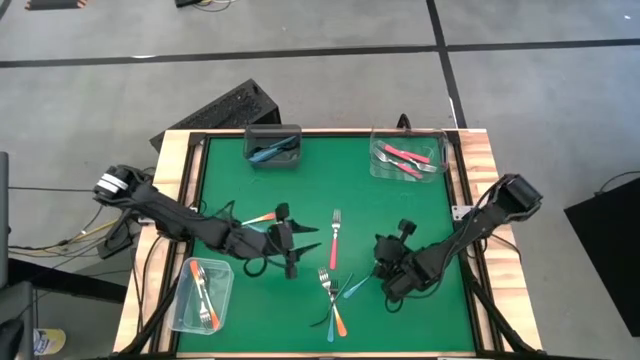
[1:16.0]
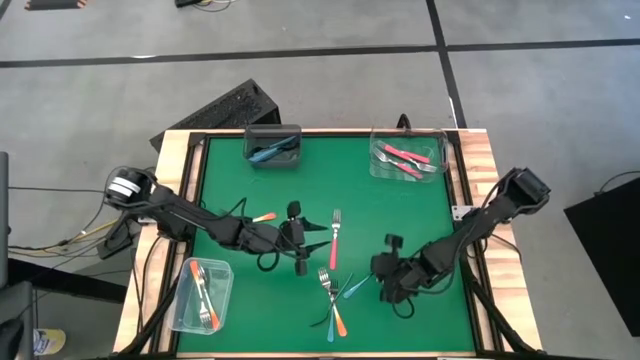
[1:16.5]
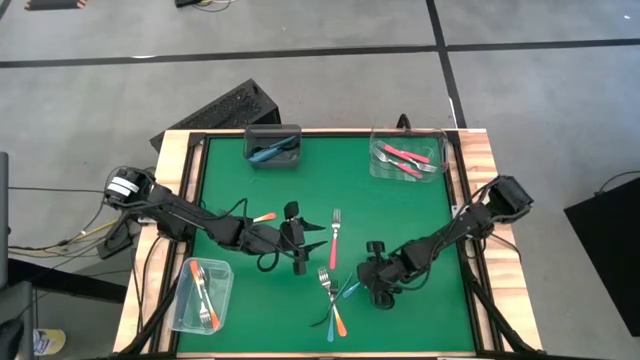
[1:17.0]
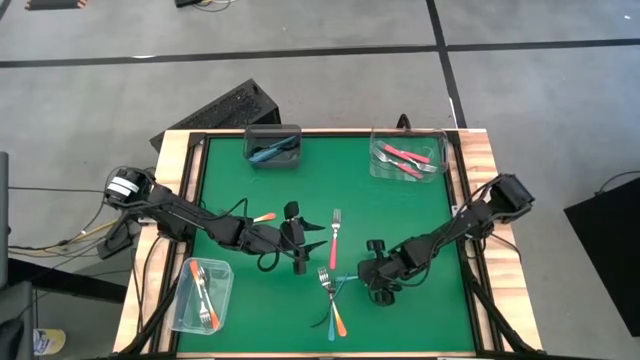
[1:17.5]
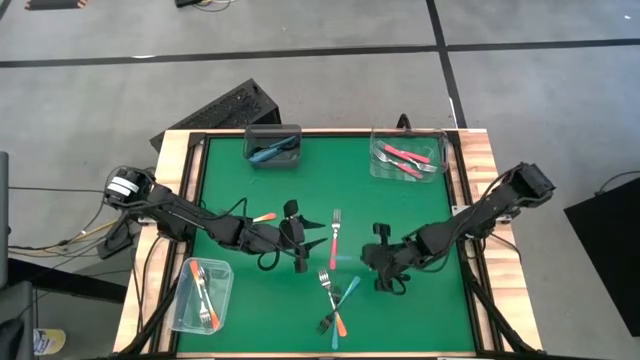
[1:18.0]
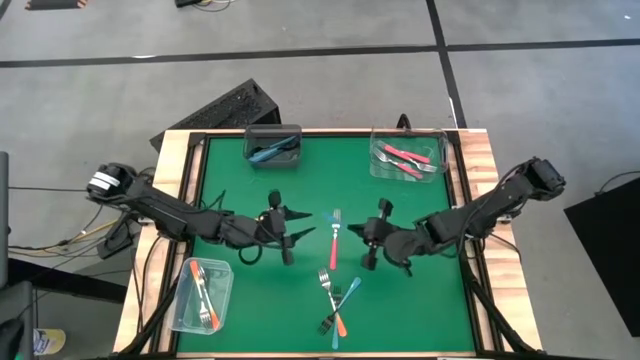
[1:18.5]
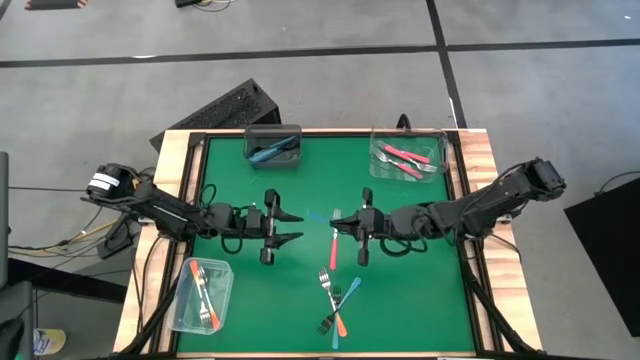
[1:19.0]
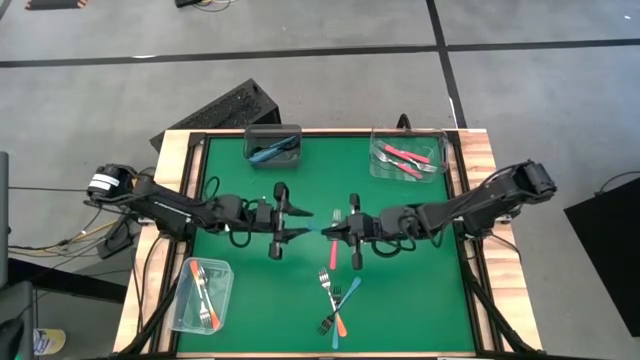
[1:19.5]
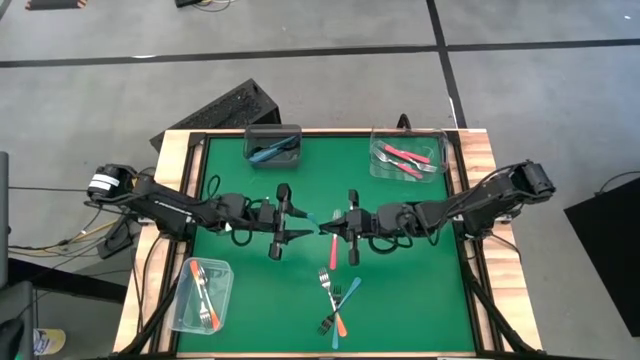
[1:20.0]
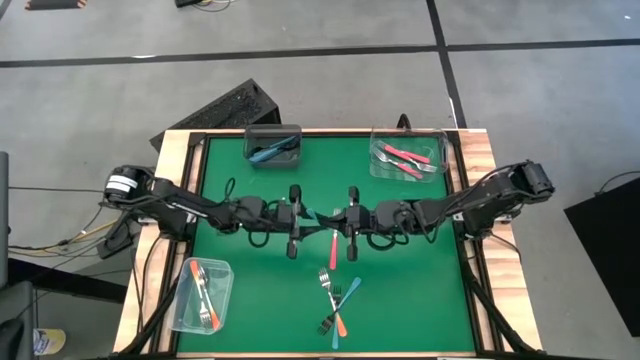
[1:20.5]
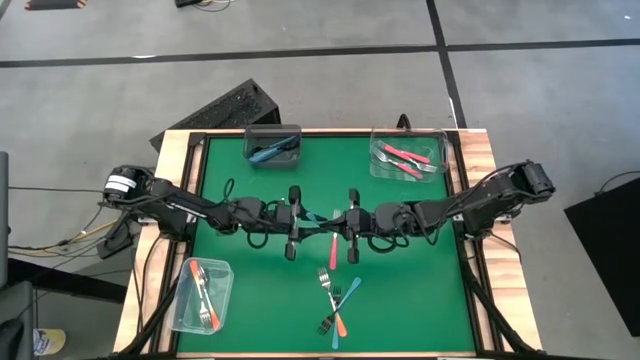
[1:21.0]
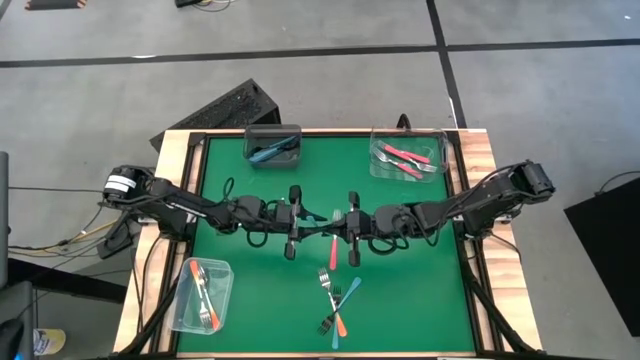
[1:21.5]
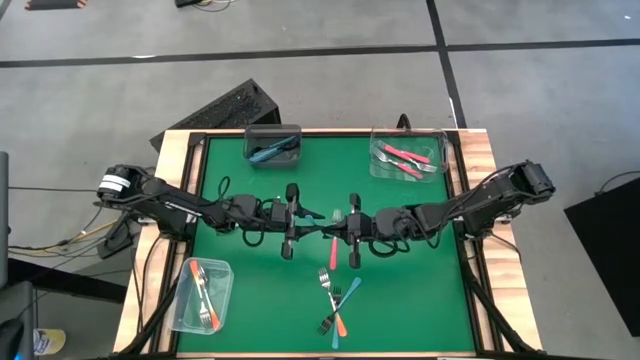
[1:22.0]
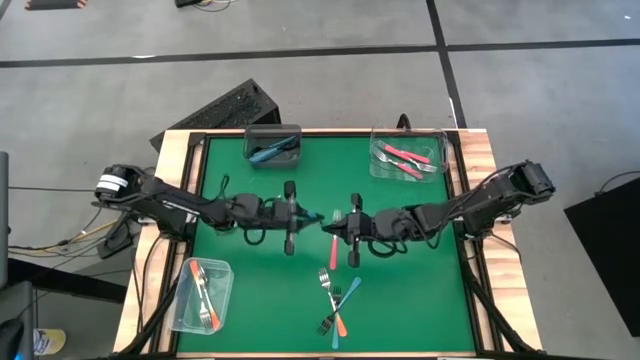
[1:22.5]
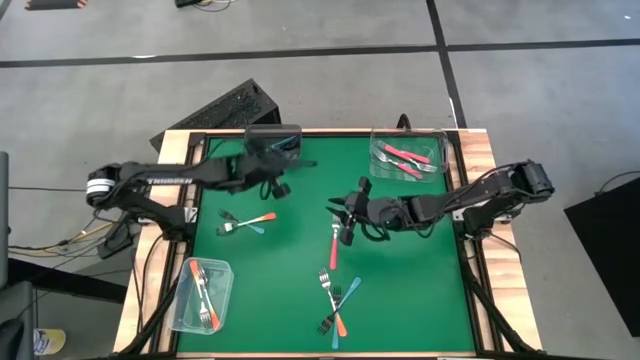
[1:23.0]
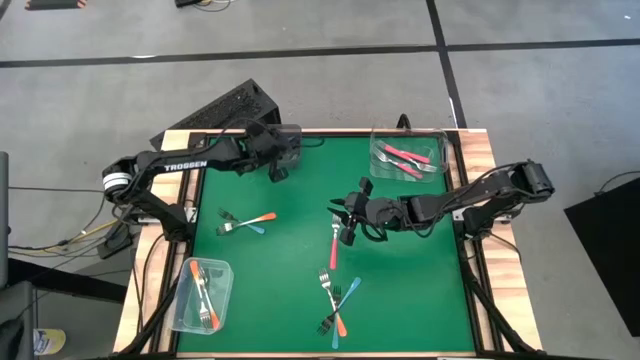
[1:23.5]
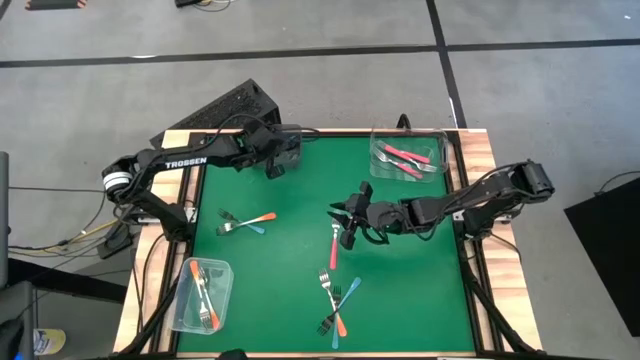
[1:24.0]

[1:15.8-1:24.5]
Task: Sort silverware by color (type)
Put the blue fork into the black bin

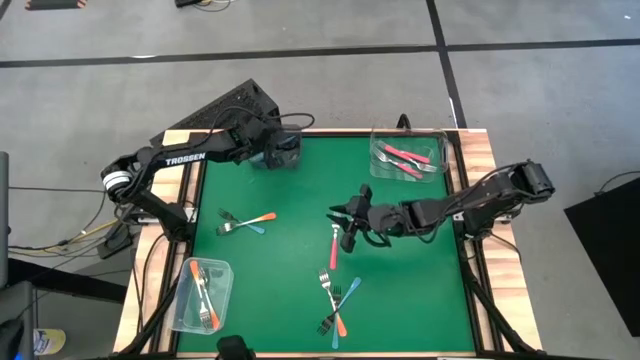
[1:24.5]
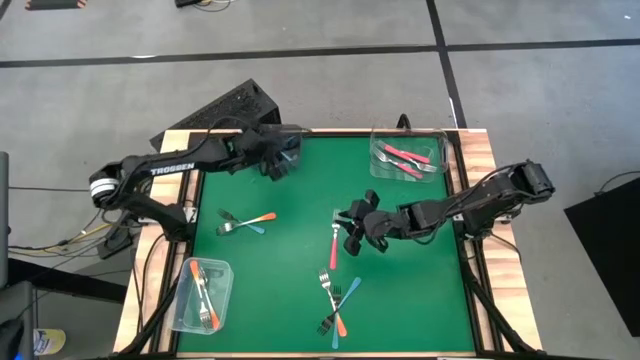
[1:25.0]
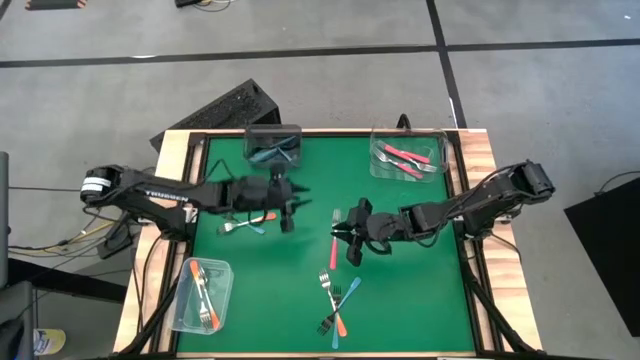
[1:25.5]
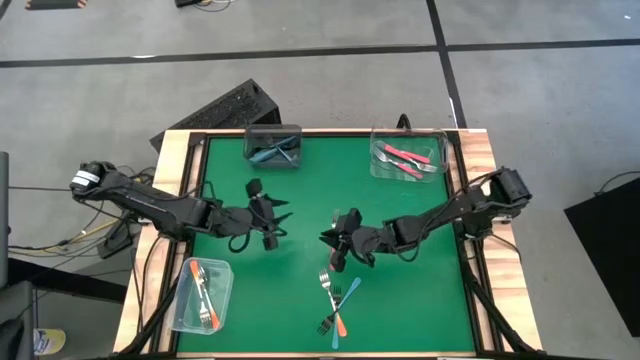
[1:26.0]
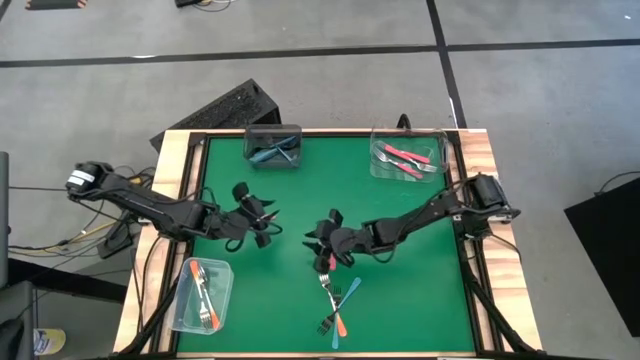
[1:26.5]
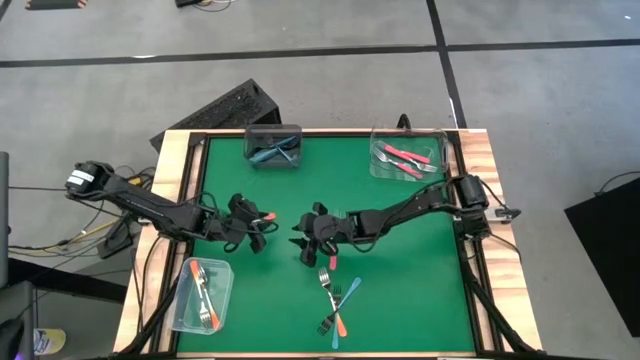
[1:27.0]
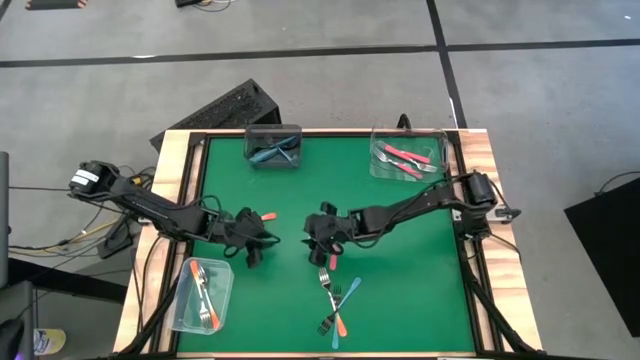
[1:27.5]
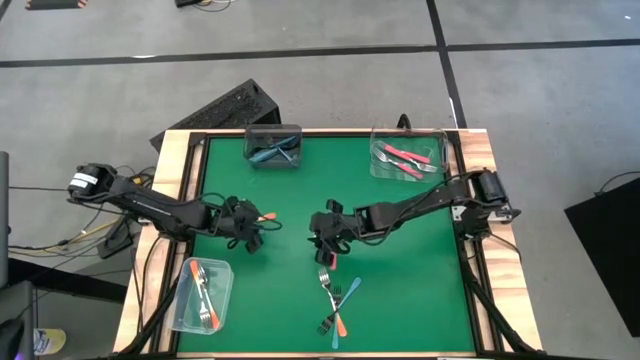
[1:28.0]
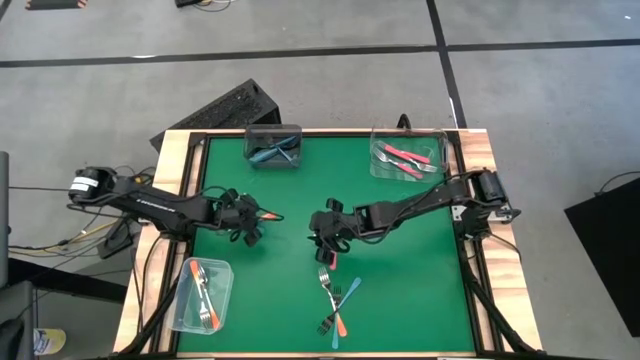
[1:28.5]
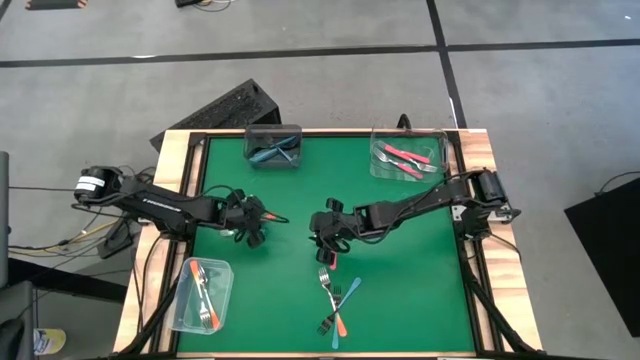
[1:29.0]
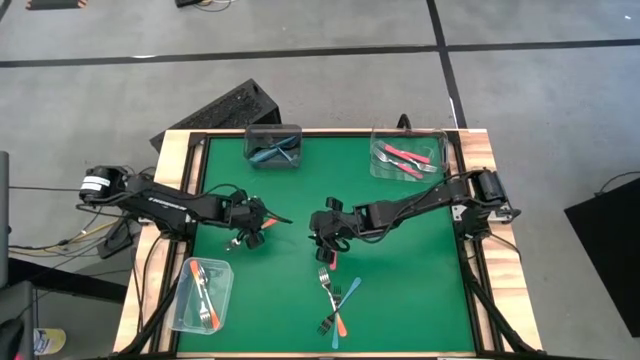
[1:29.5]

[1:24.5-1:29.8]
Put the orange fork into the white bin

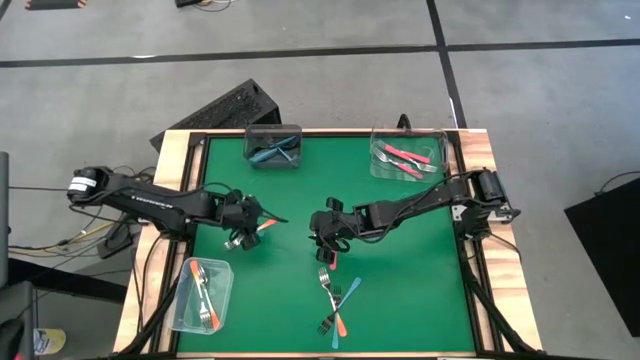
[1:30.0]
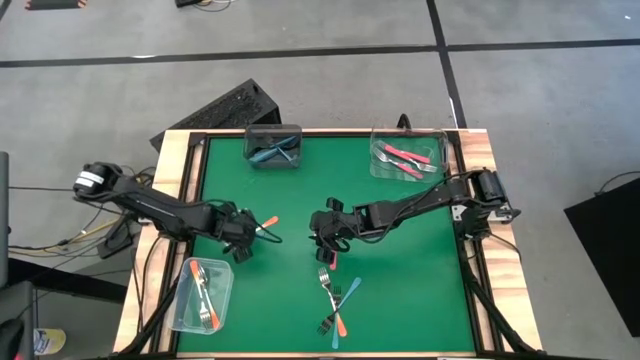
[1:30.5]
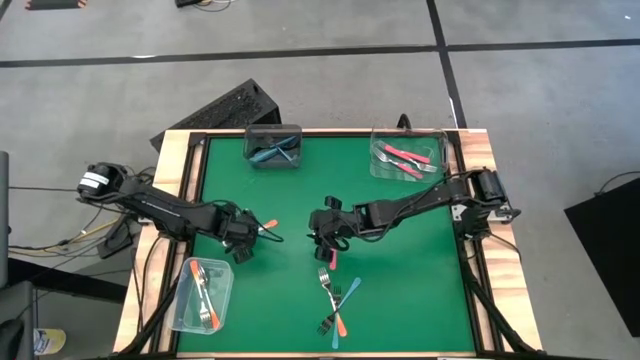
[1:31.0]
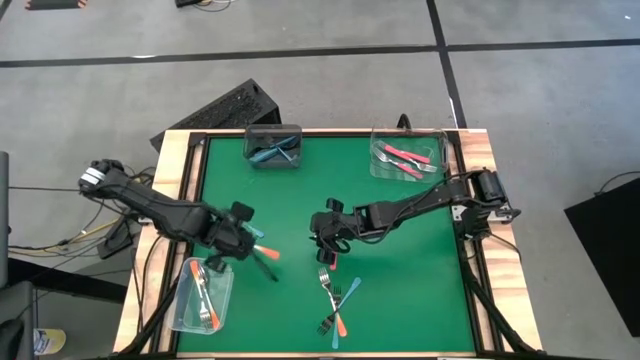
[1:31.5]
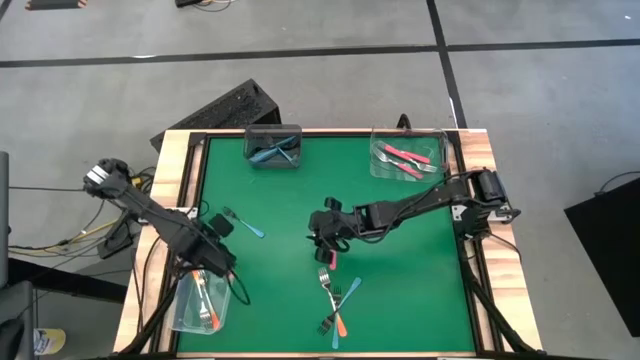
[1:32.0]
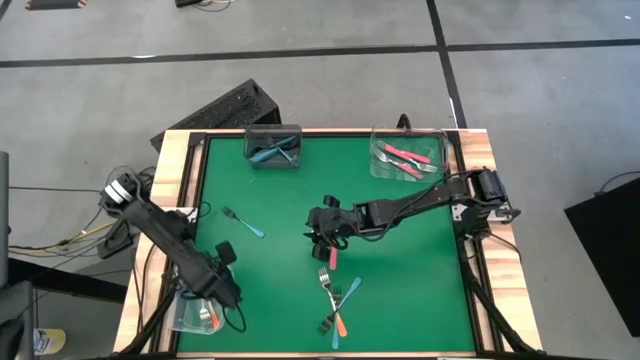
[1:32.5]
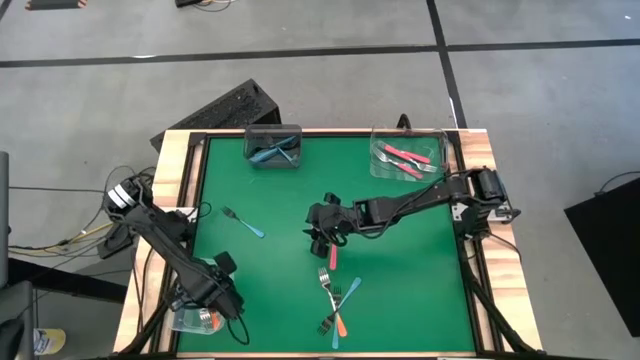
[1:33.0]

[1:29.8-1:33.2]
Put the orange fork into the white bin

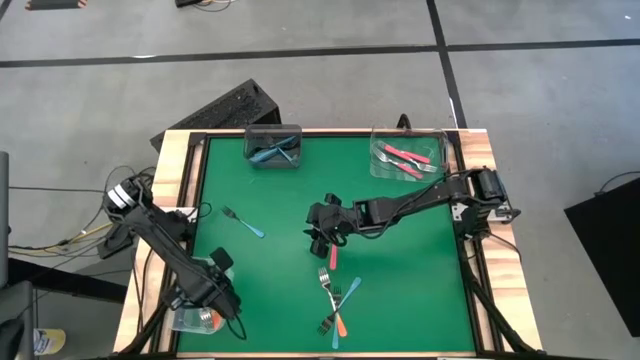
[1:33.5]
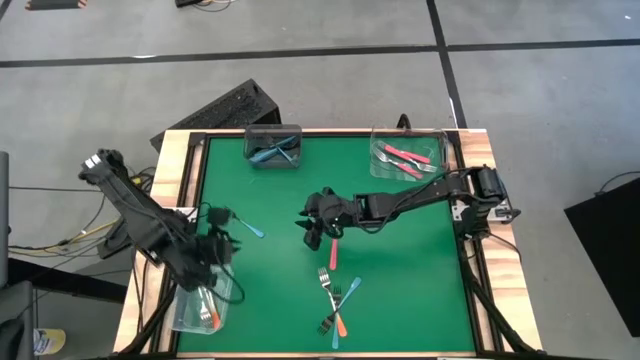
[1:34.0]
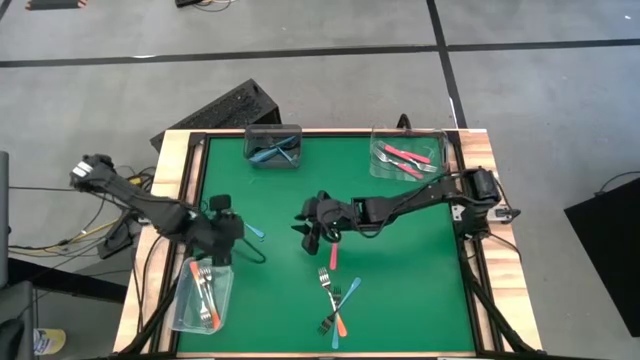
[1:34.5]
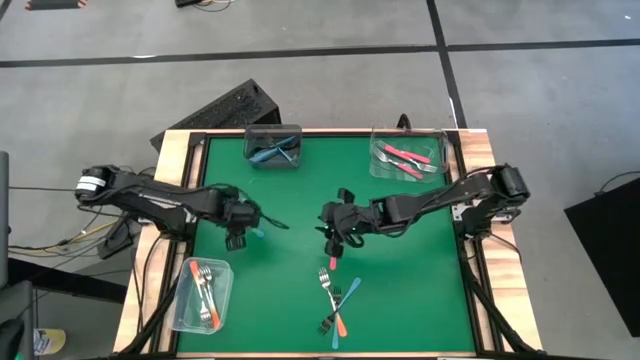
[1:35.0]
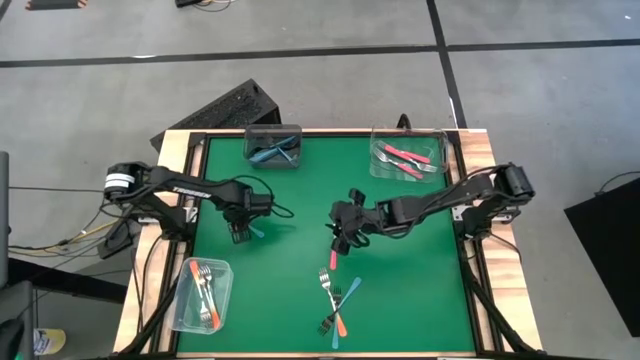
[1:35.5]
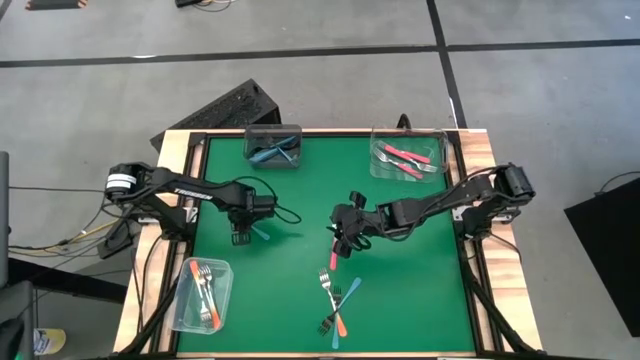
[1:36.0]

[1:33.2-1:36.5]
Put the blue fork into the black bin

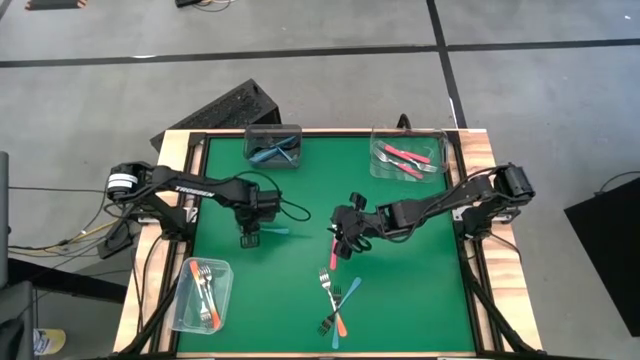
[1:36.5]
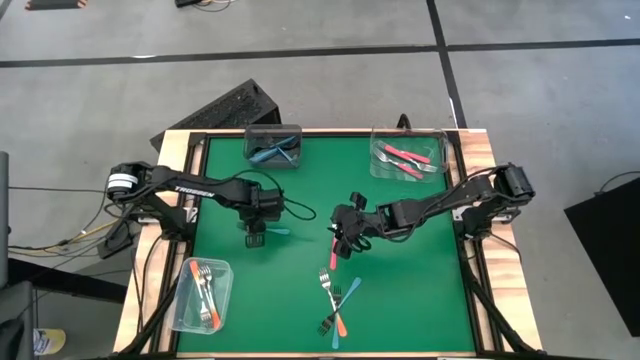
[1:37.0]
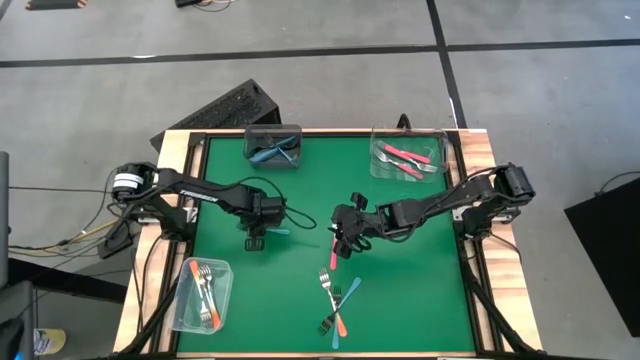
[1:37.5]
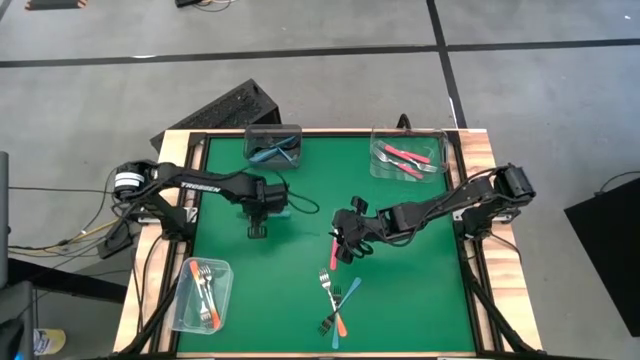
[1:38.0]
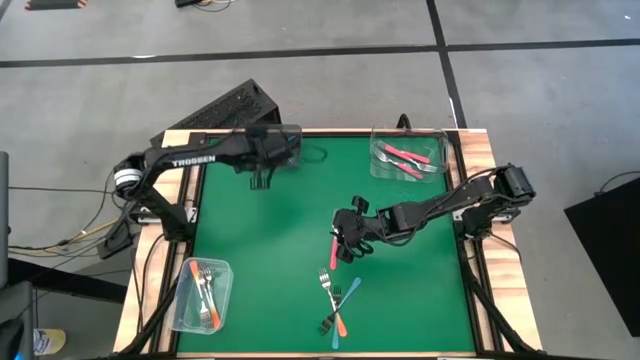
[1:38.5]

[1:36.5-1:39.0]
Put the blue fork into the black bin
